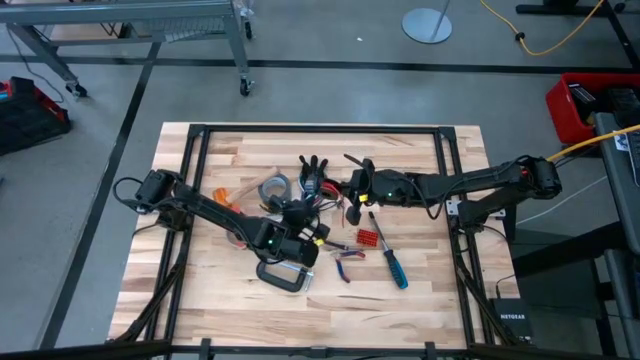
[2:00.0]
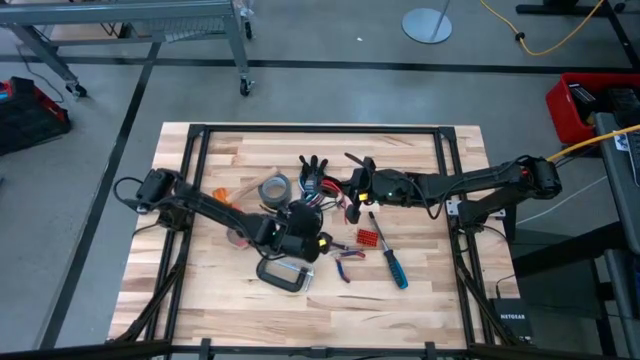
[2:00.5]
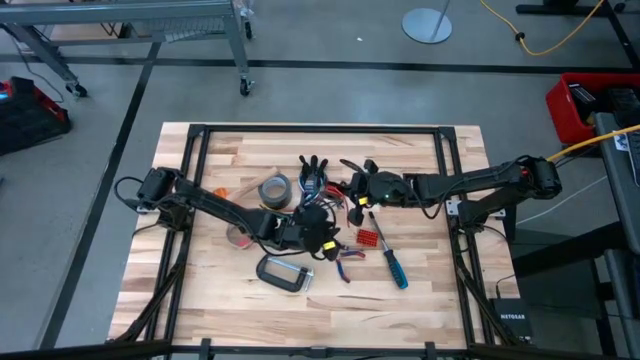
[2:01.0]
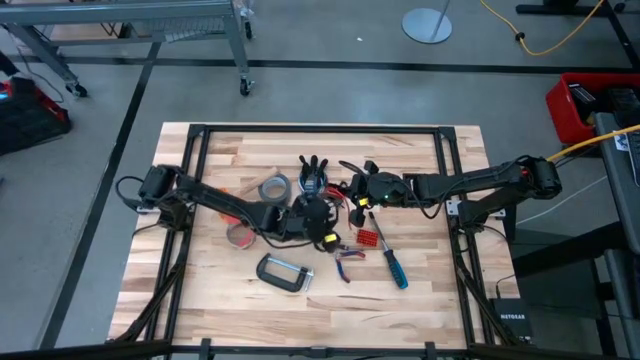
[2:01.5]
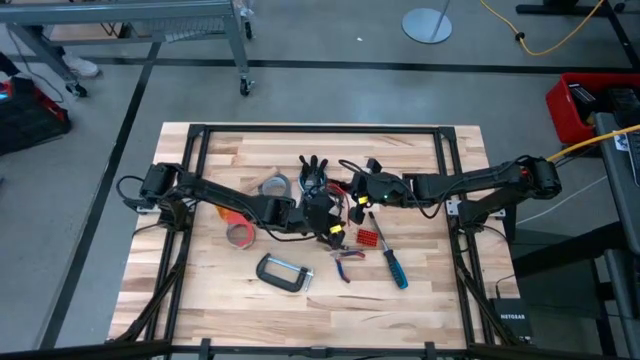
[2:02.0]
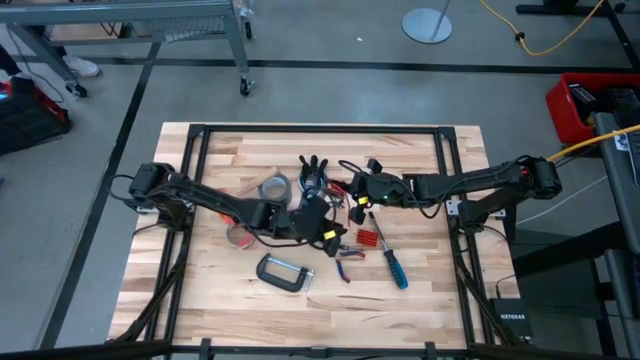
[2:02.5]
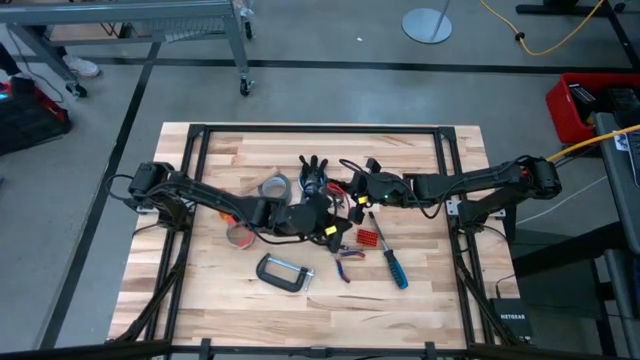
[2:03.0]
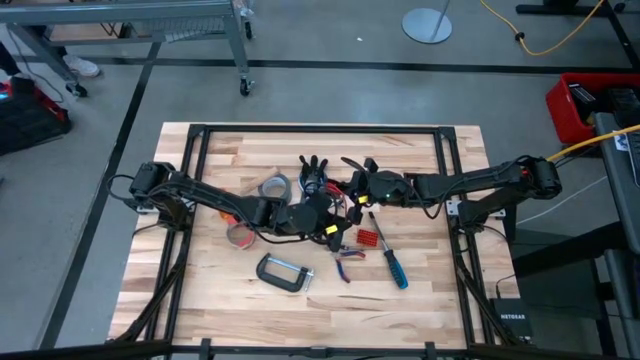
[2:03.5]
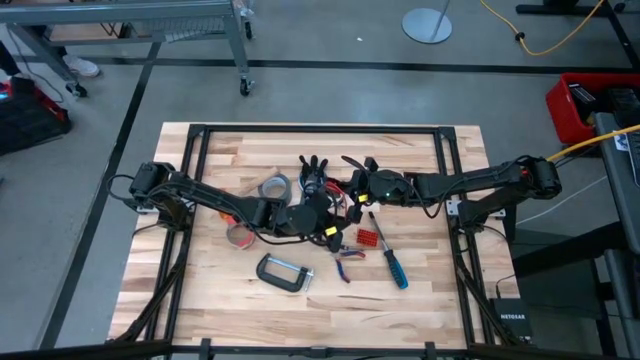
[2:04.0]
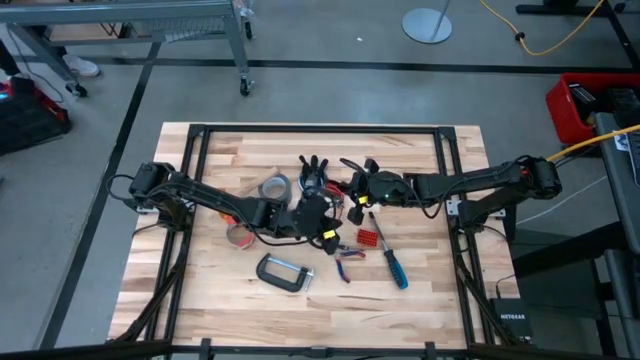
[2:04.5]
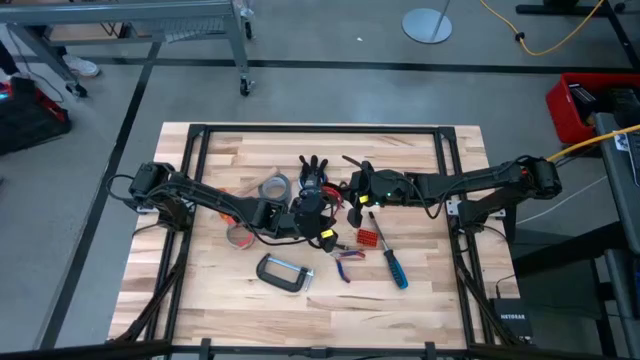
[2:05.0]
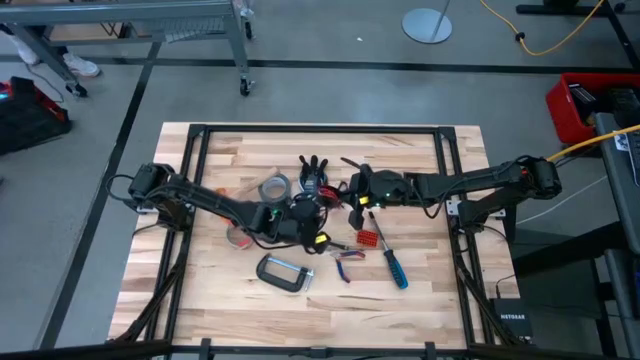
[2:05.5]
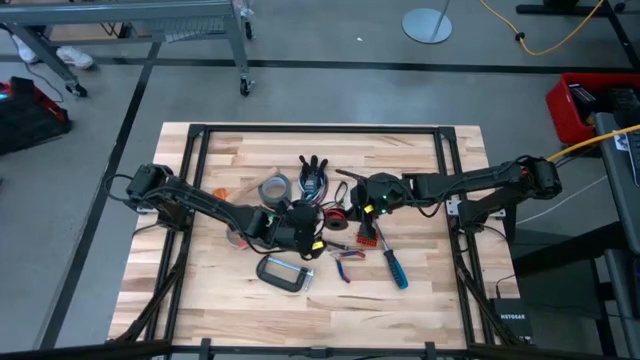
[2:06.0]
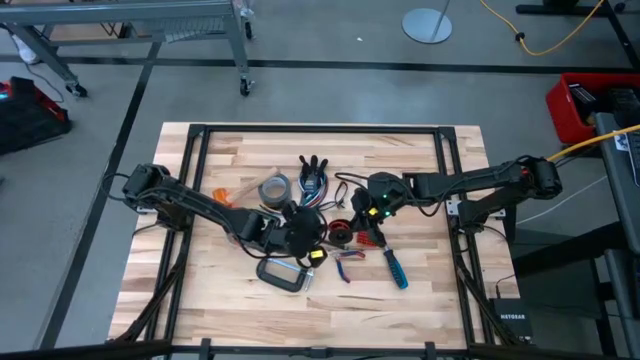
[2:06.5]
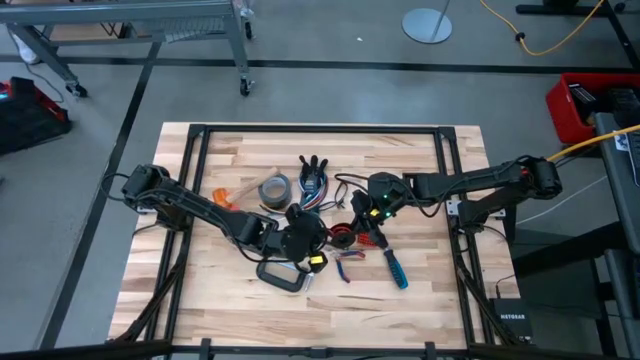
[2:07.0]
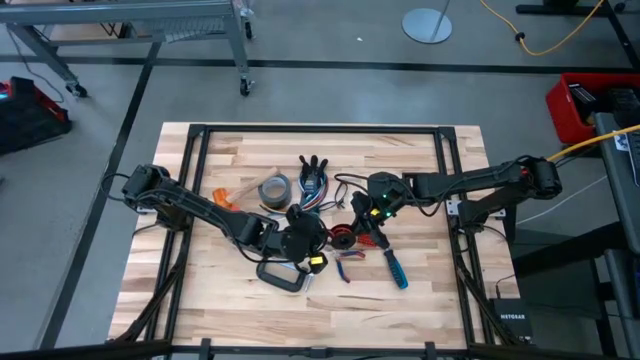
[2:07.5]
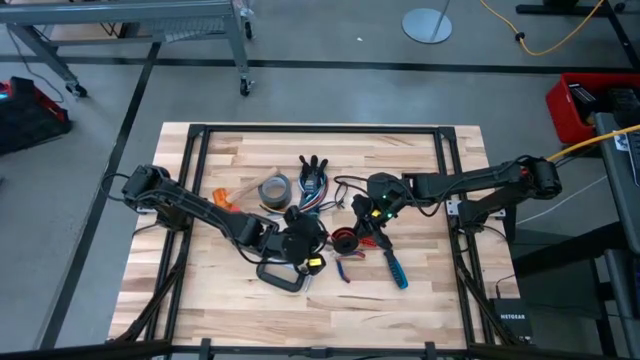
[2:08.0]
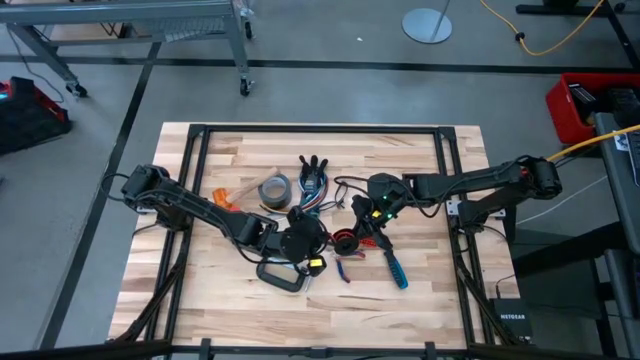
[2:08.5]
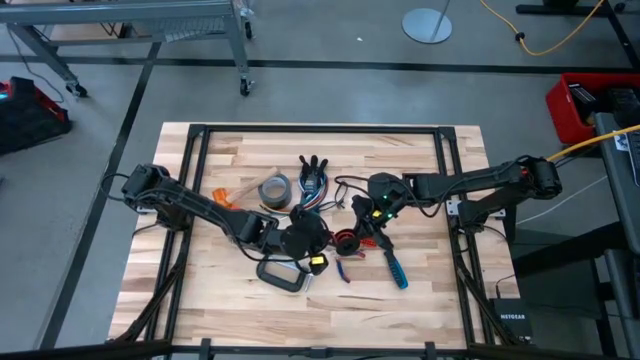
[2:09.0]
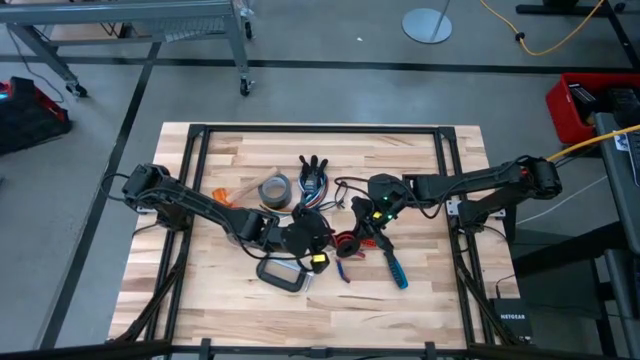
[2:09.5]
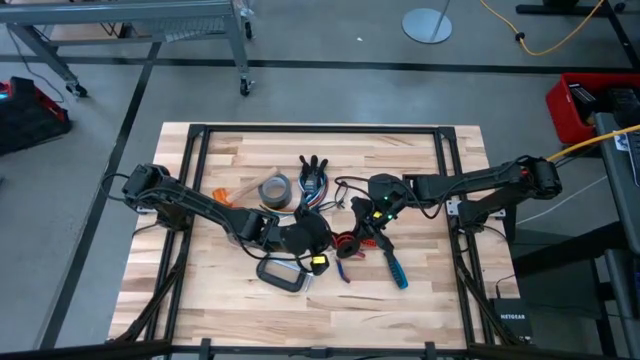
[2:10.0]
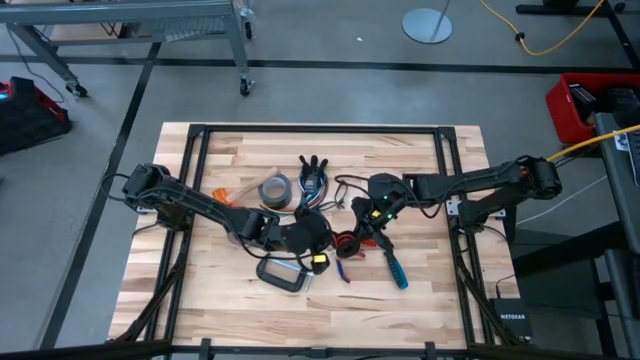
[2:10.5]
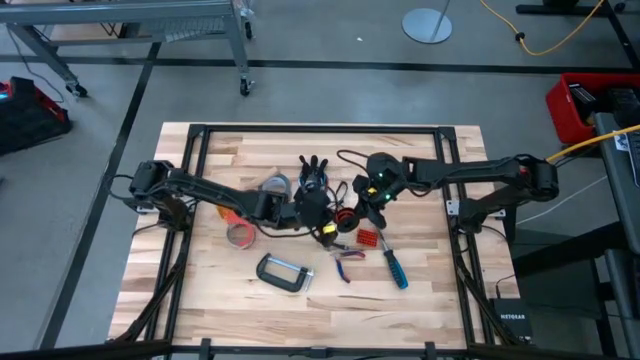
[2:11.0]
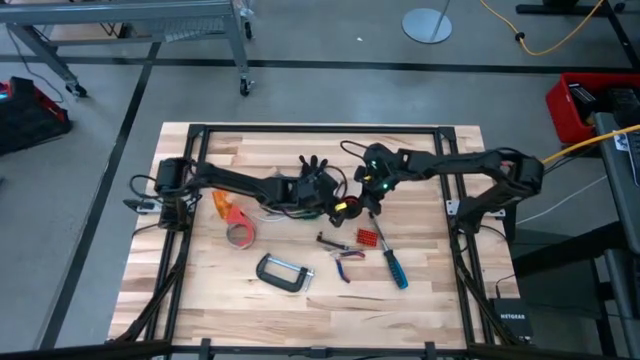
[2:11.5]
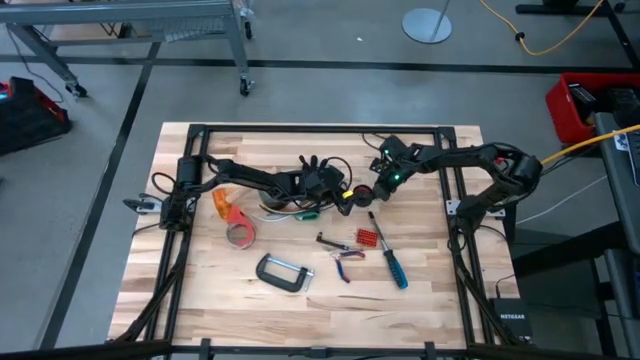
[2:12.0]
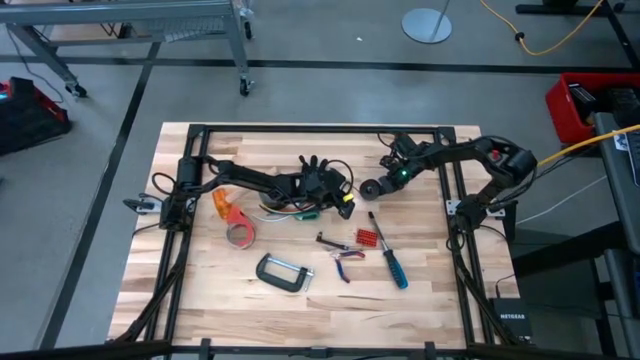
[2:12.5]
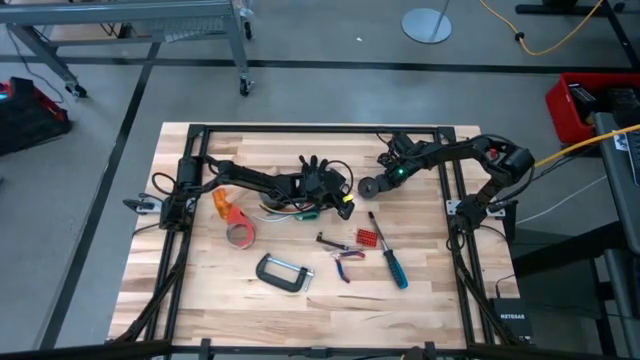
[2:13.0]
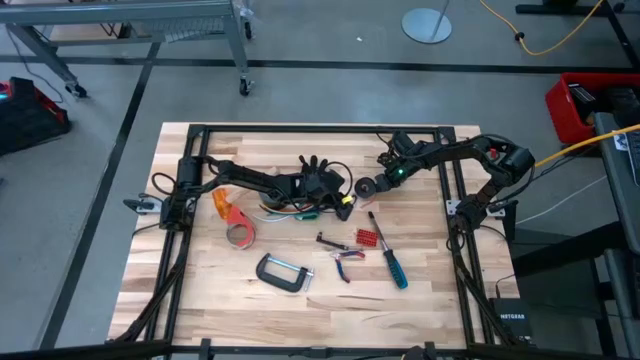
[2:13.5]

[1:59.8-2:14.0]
Task: Coil cords
Coil the red wire onto a black spool

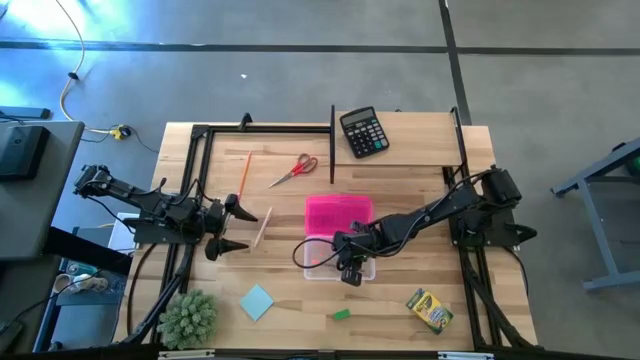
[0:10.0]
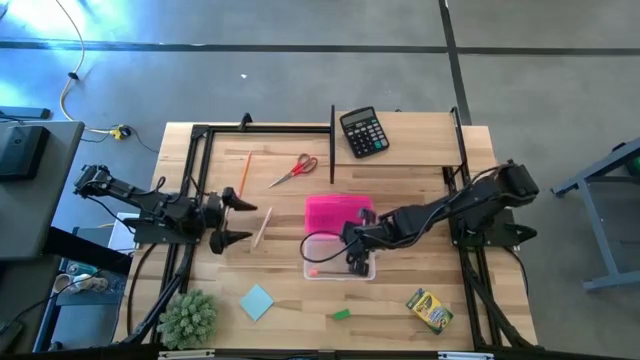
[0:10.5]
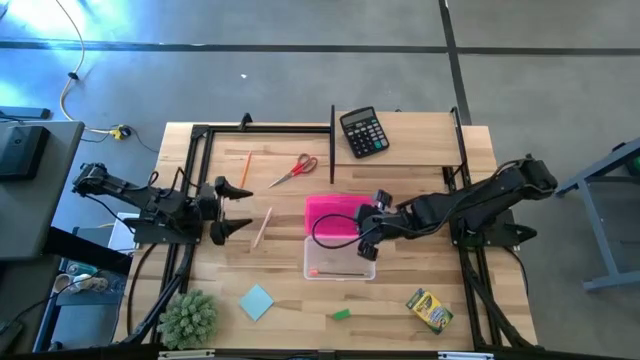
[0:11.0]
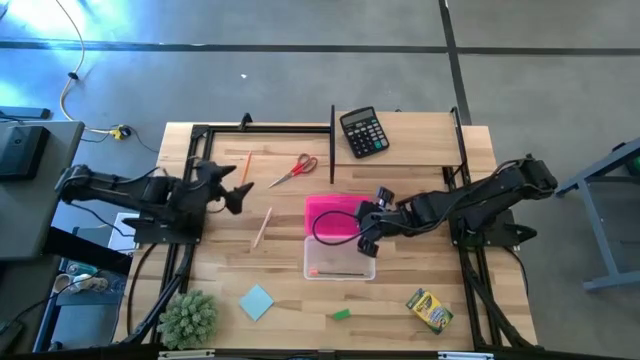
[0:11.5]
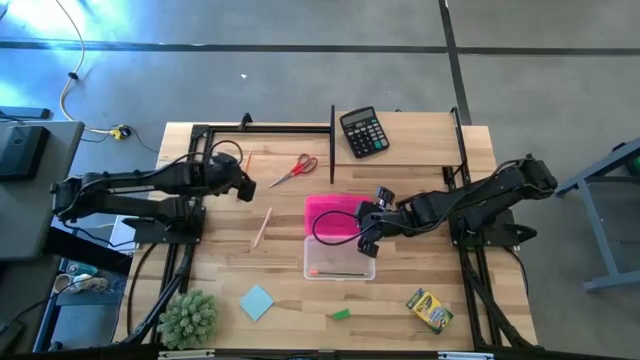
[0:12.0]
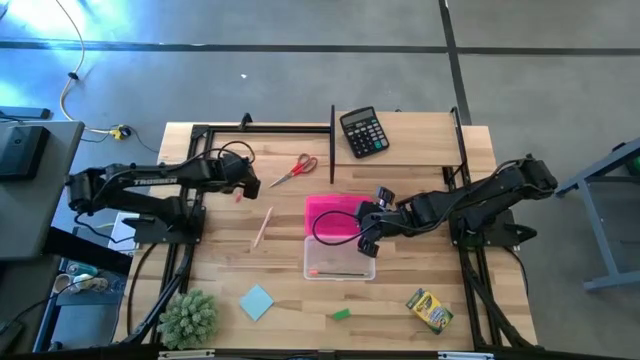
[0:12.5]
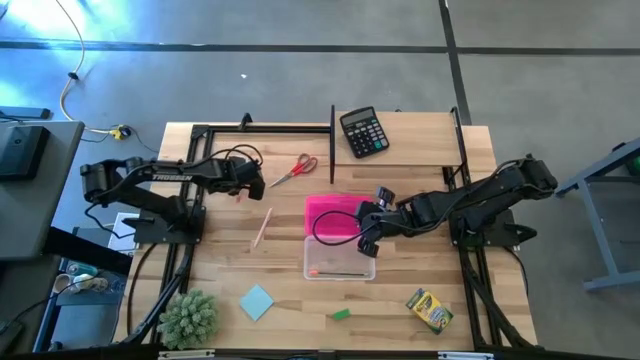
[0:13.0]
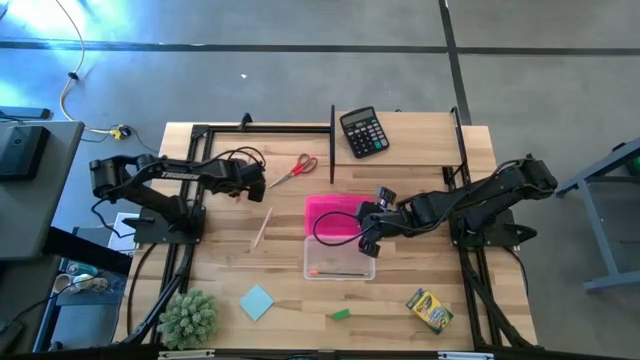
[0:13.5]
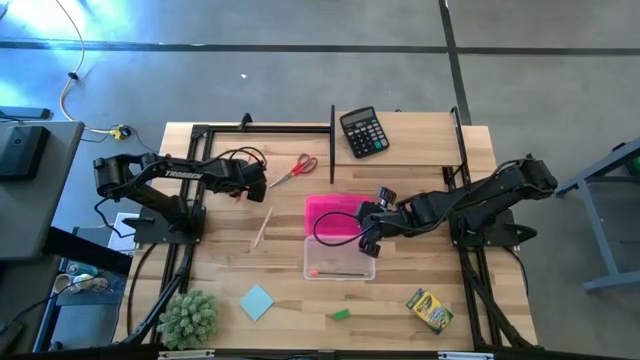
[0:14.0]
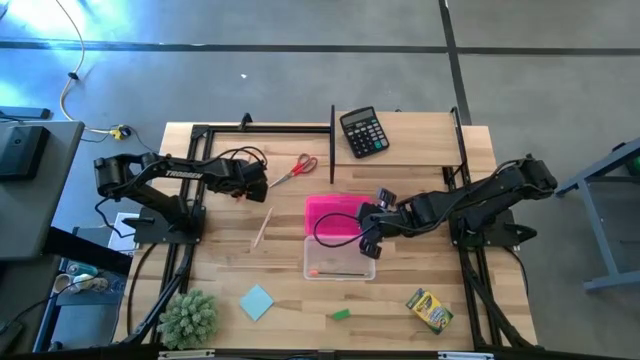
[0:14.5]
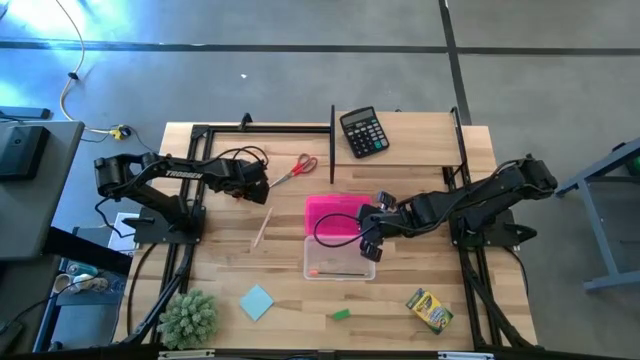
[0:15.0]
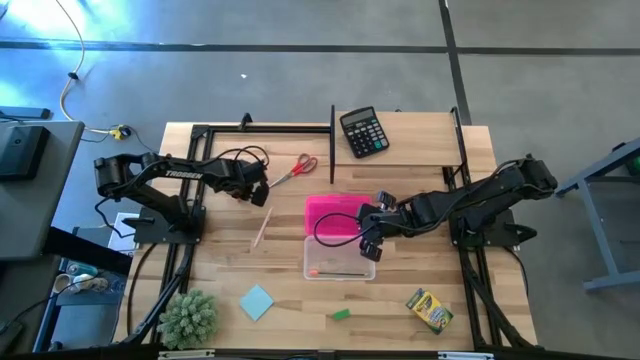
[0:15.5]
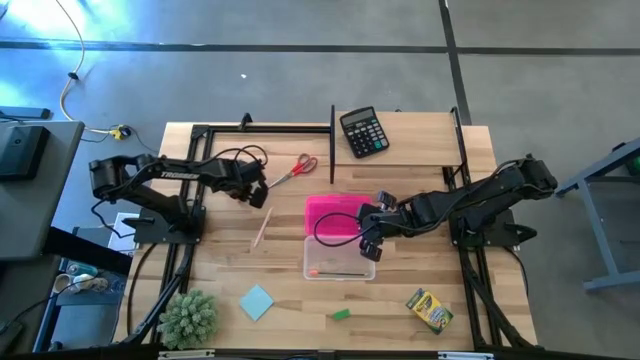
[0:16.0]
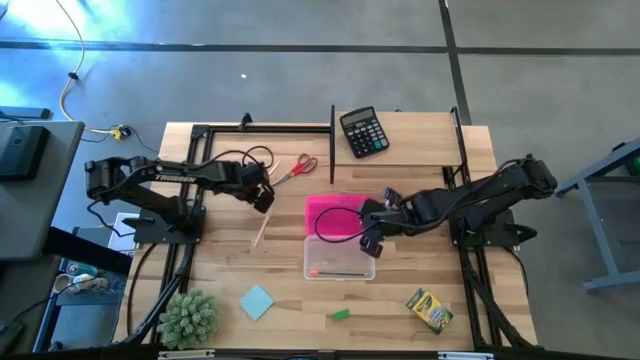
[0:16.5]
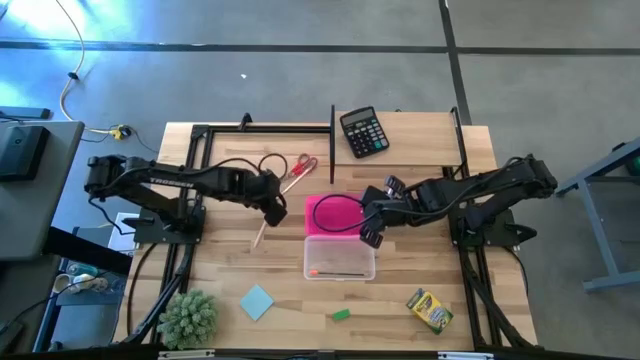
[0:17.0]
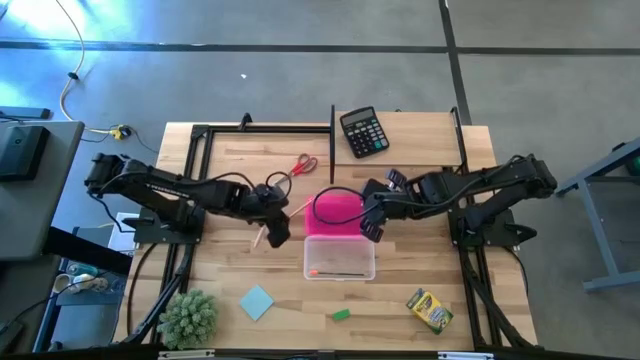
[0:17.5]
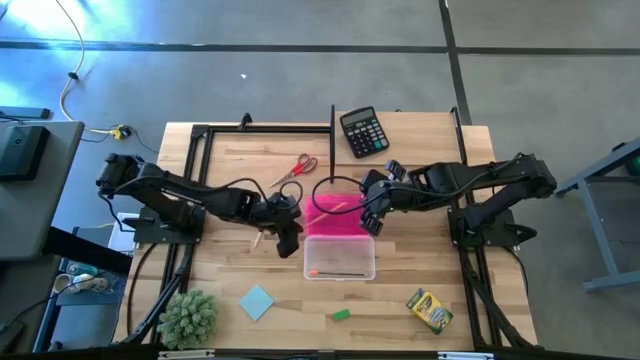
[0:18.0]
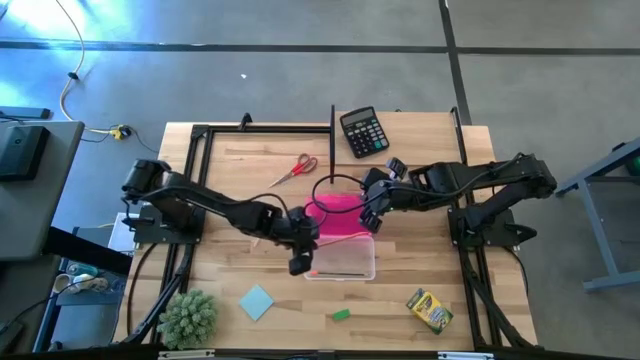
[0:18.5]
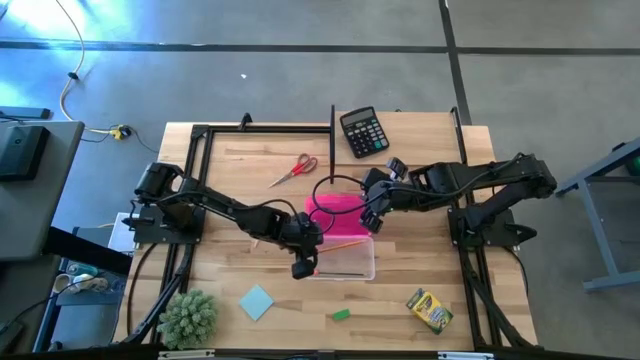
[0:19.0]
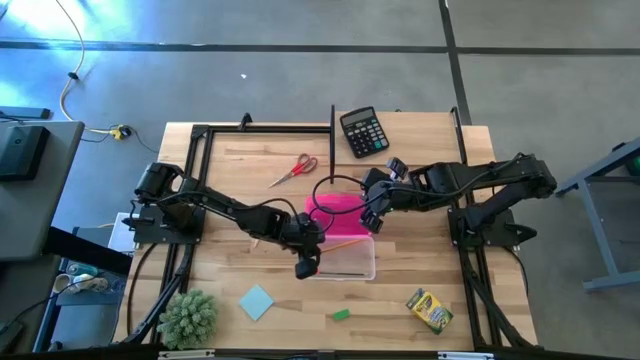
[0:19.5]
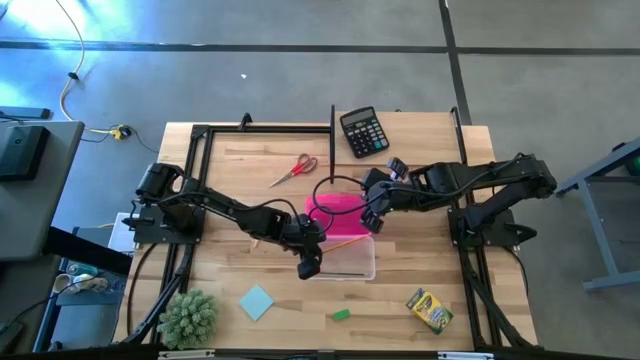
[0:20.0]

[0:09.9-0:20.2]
Task: Pack school essentials
Put the yellow pencil into the supply box
